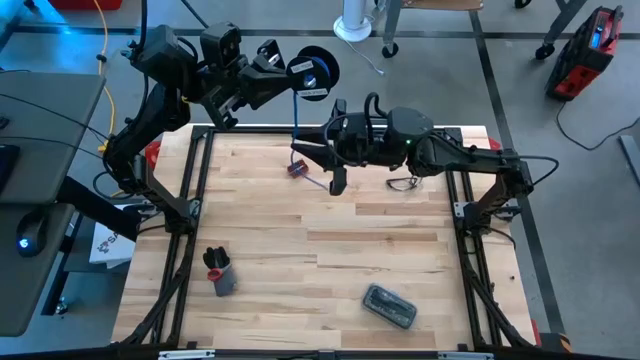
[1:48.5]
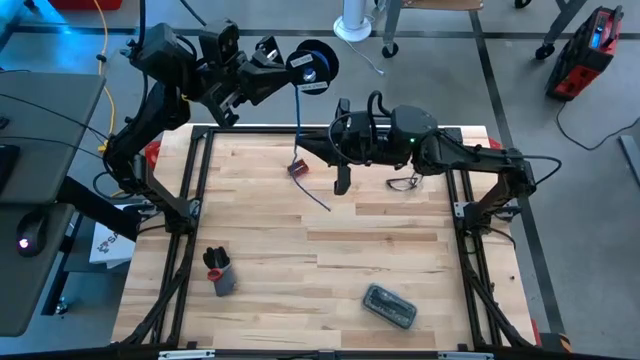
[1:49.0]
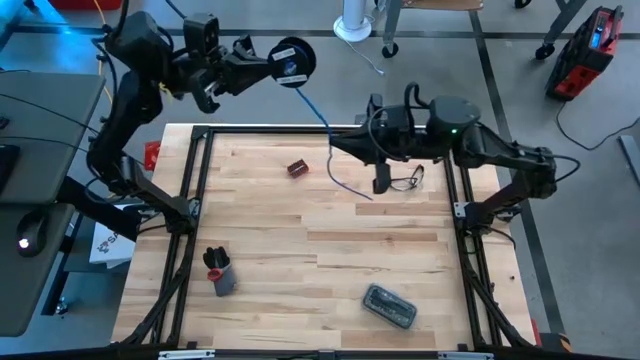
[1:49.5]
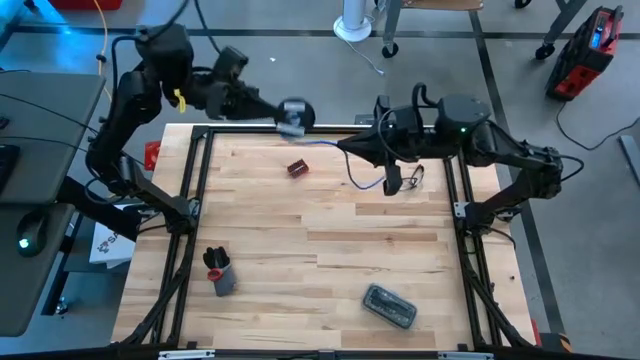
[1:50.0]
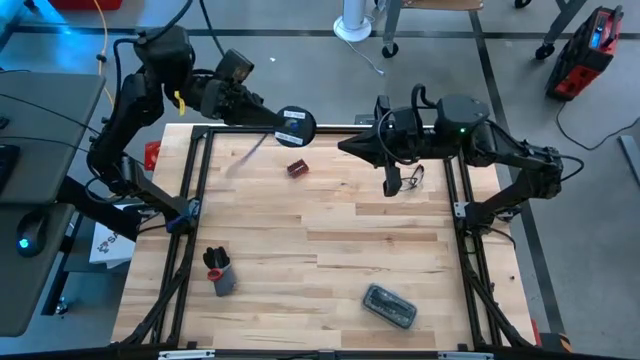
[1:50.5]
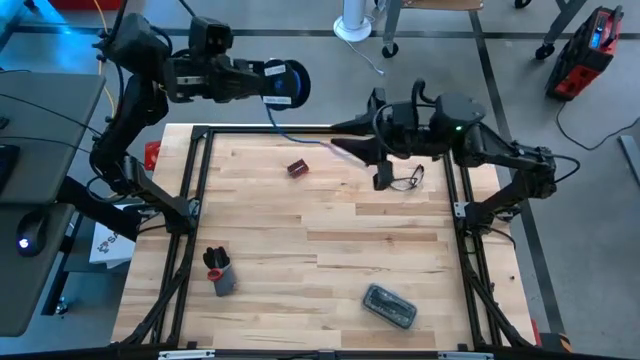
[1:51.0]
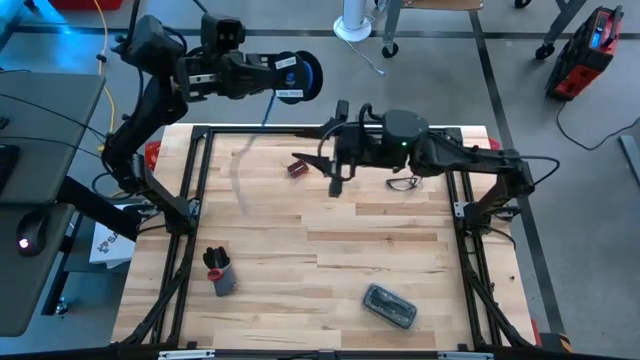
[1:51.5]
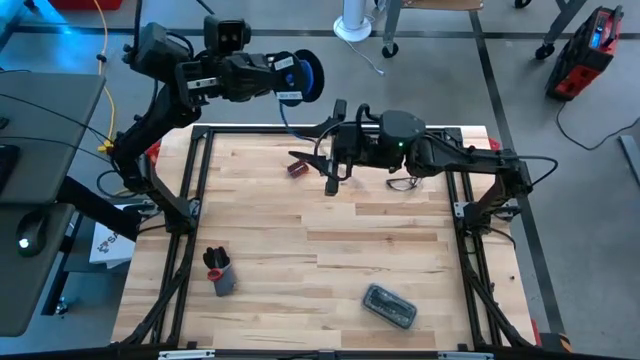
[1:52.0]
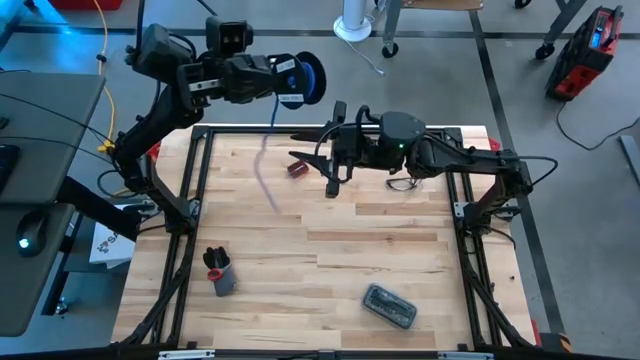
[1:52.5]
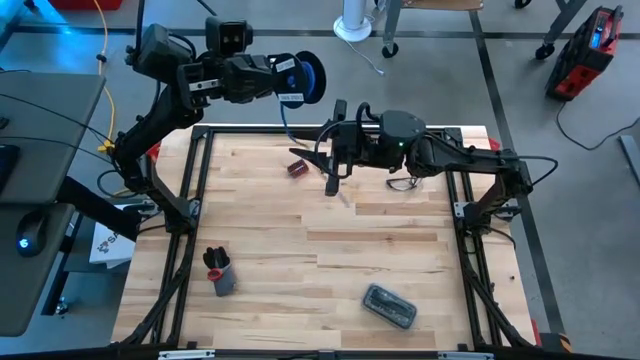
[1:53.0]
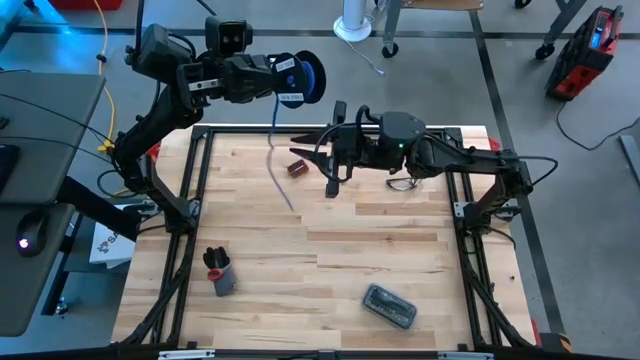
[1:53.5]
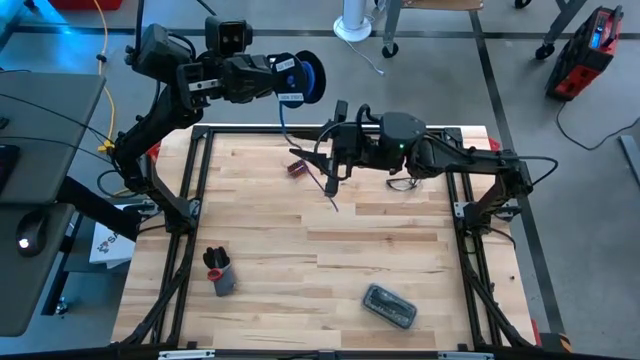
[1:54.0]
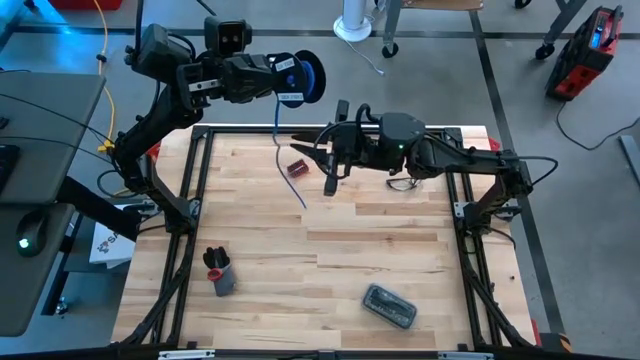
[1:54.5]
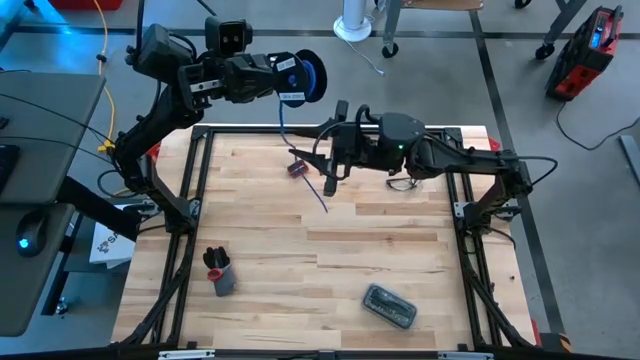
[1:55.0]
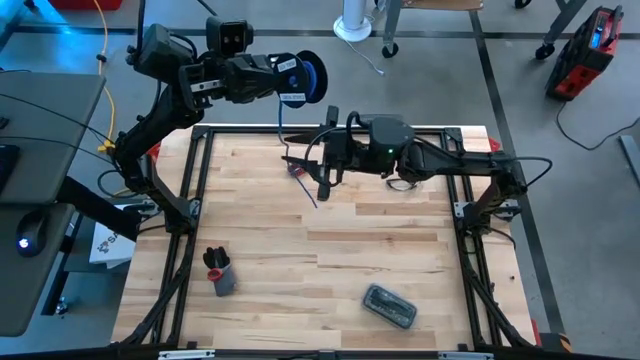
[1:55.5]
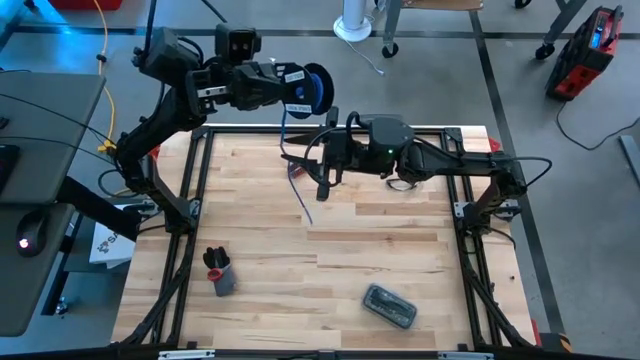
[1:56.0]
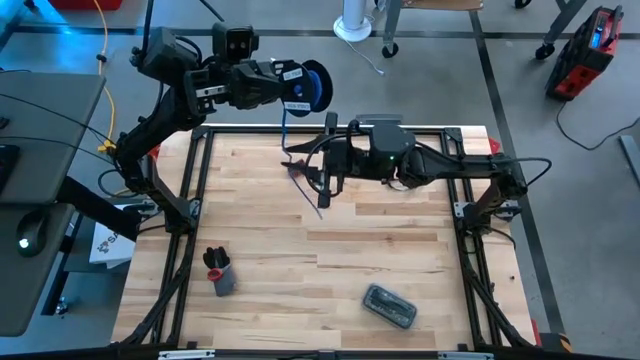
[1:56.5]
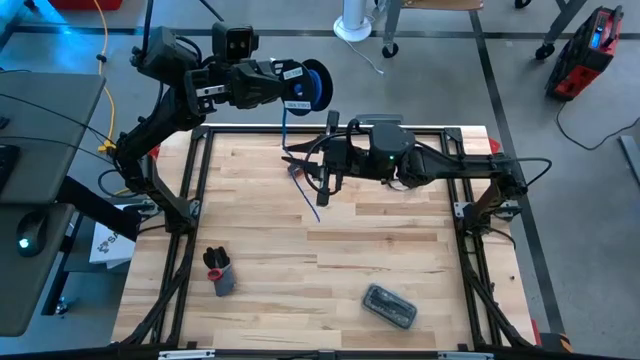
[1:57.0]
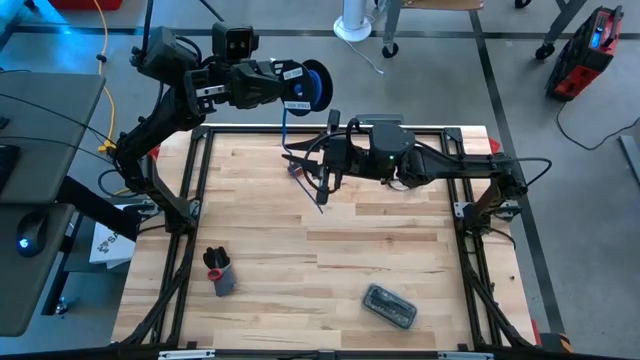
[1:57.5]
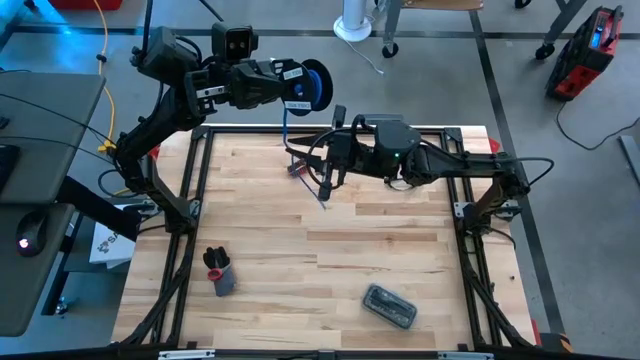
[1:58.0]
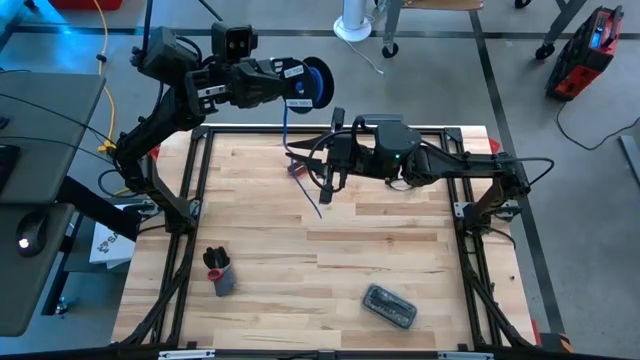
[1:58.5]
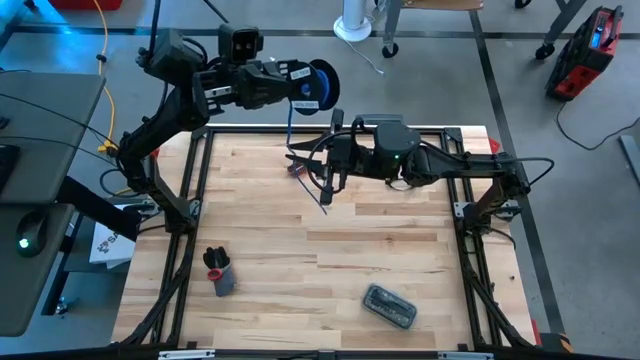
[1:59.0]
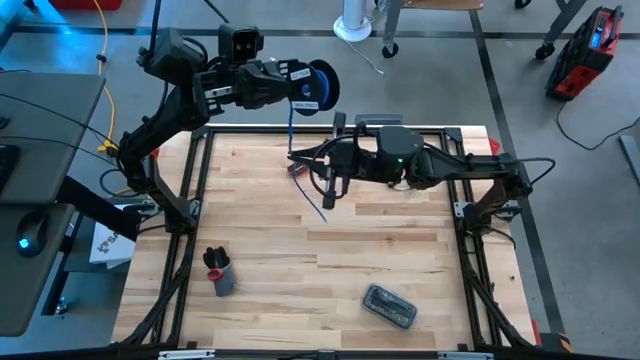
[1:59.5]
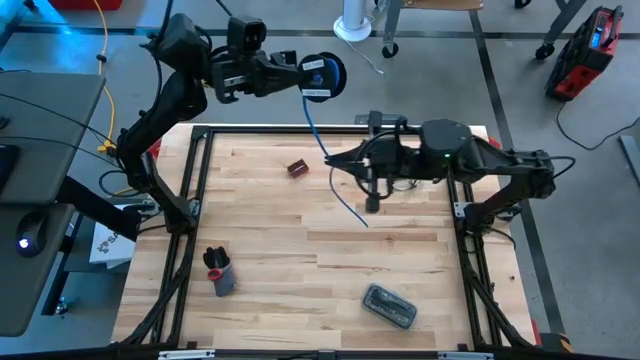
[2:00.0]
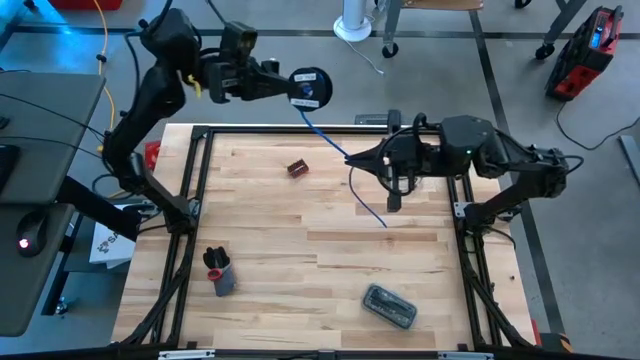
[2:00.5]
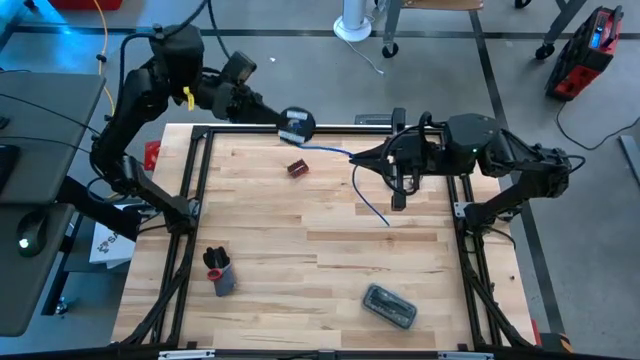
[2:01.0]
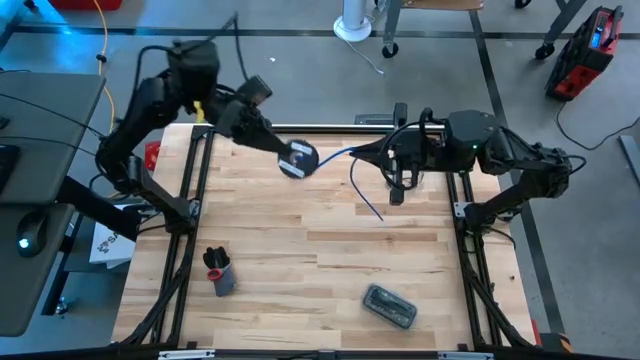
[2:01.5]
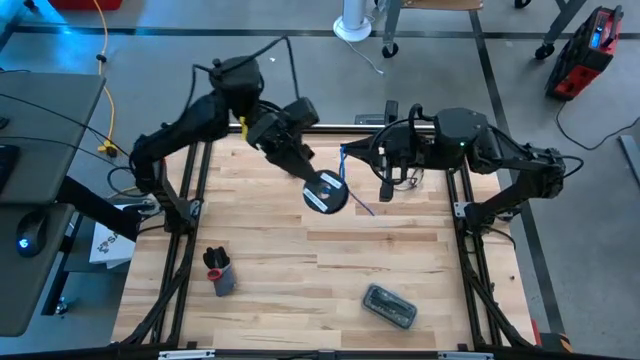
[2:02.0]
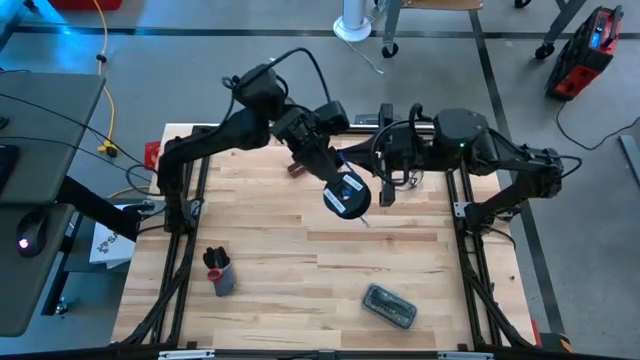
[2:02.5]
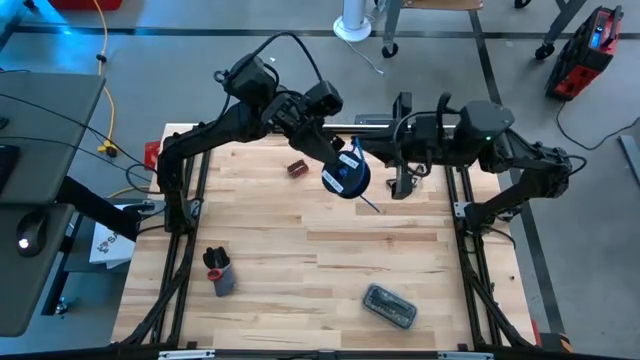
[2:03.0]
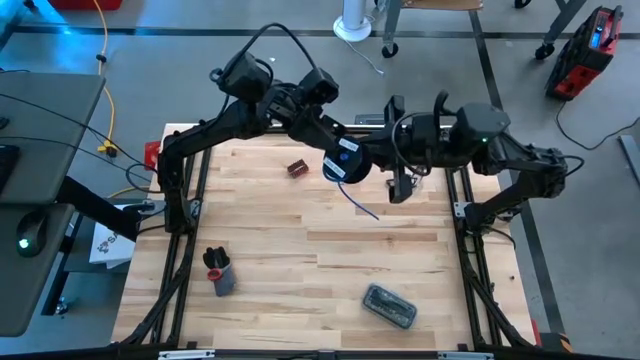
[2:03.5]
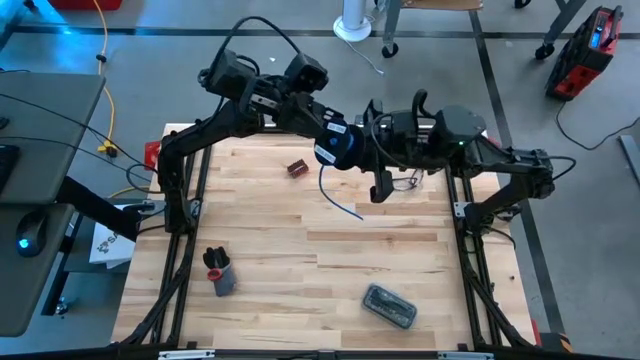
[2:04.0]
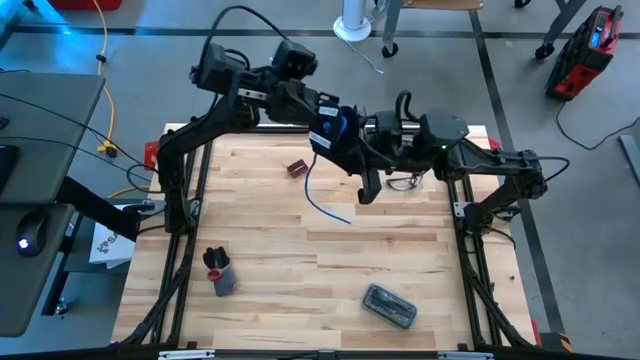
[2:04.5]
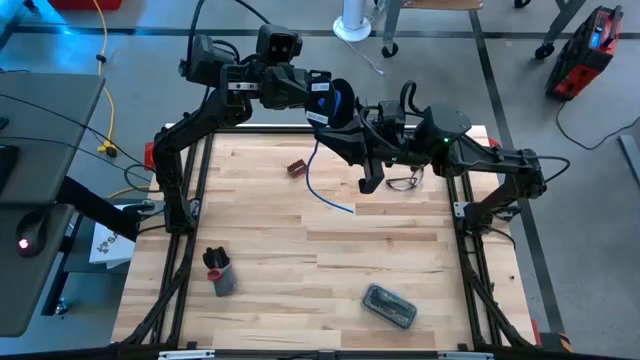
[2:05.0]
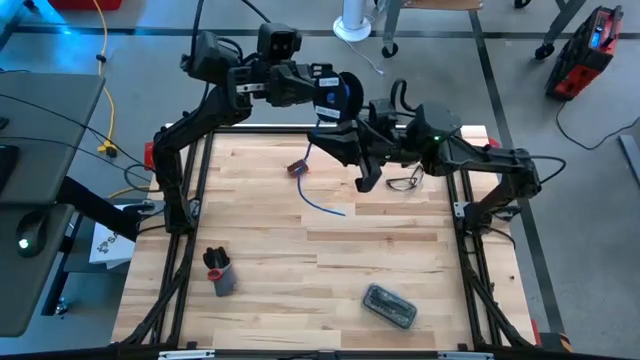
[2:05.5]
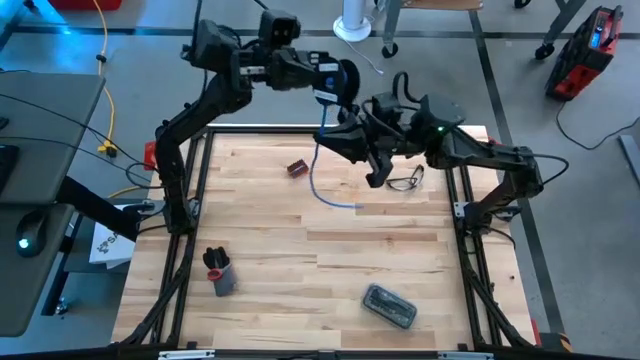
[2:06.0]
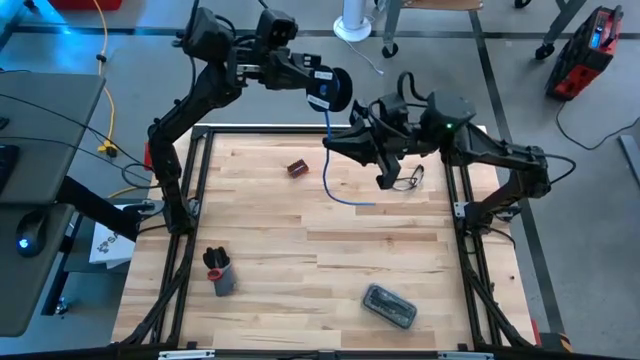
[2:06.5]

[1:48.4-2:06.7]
Task: Coil cords
Coil the blue wire onto the spool
